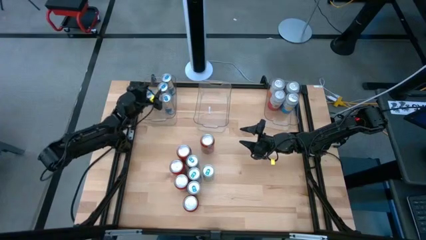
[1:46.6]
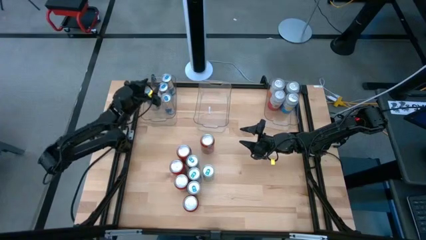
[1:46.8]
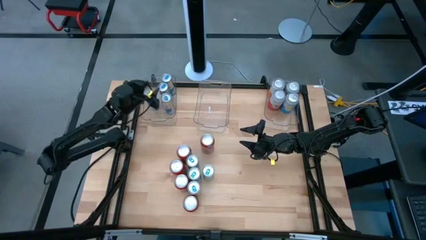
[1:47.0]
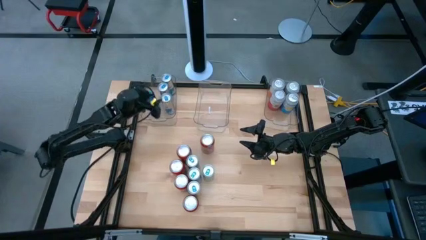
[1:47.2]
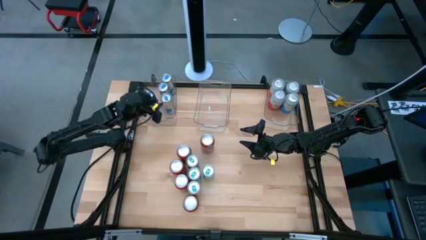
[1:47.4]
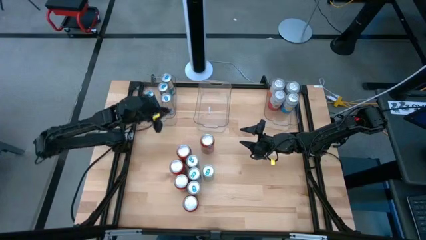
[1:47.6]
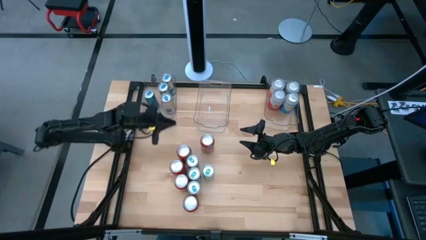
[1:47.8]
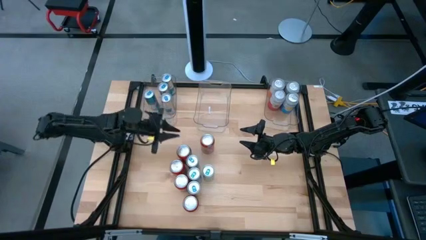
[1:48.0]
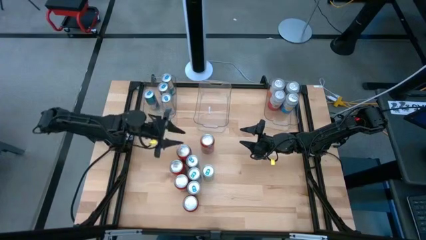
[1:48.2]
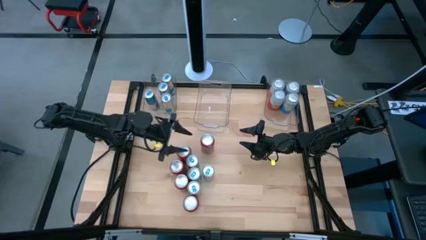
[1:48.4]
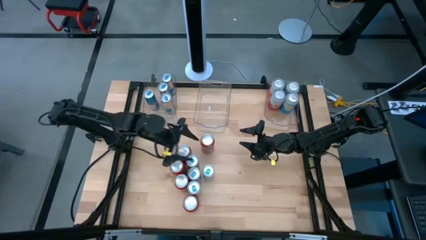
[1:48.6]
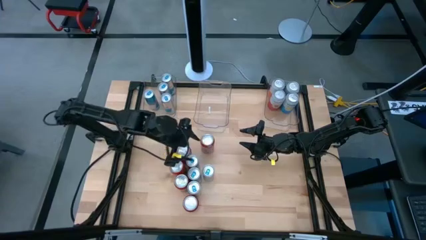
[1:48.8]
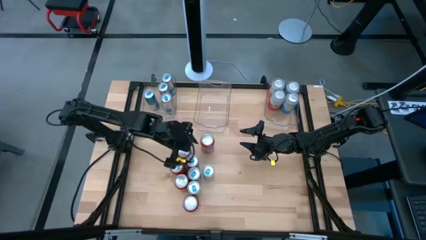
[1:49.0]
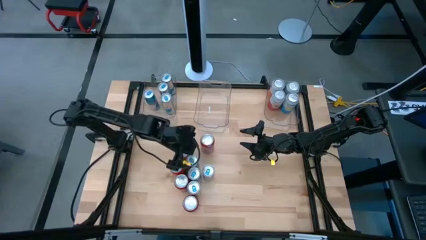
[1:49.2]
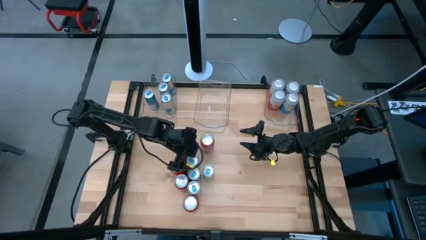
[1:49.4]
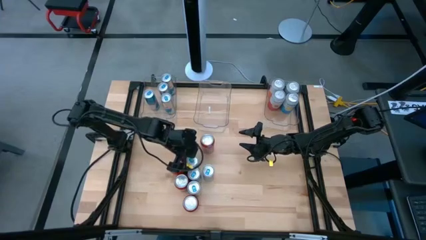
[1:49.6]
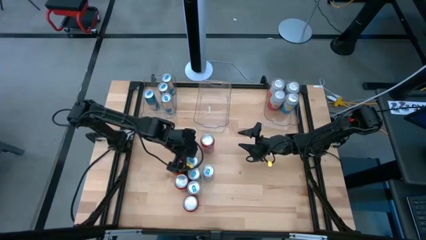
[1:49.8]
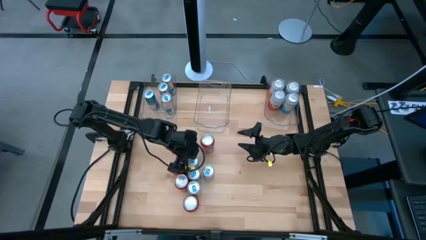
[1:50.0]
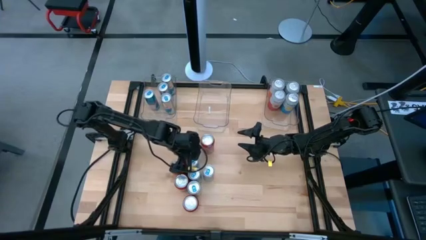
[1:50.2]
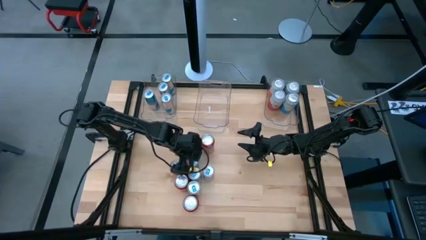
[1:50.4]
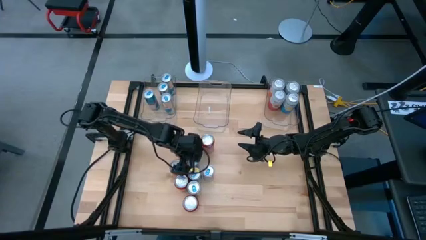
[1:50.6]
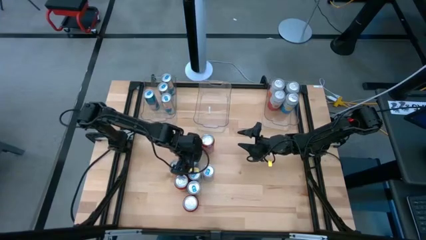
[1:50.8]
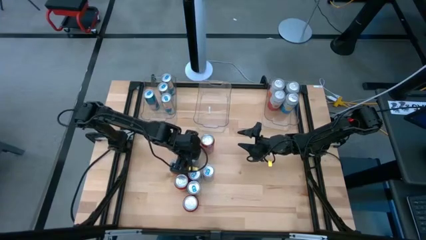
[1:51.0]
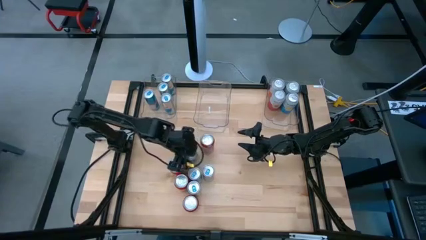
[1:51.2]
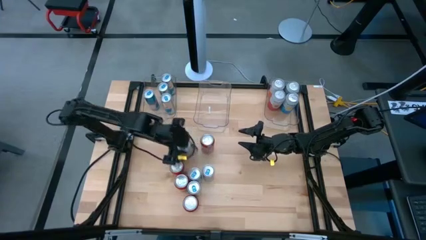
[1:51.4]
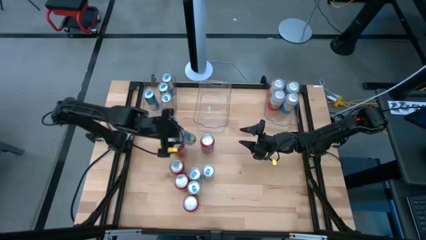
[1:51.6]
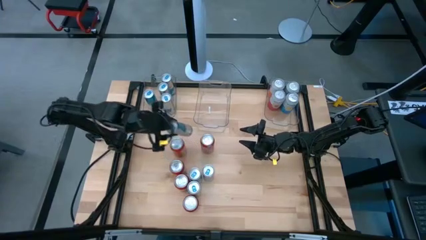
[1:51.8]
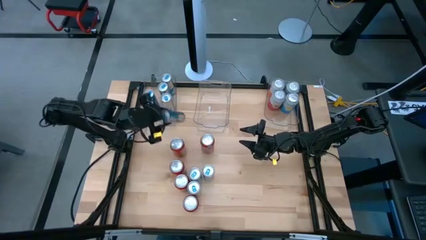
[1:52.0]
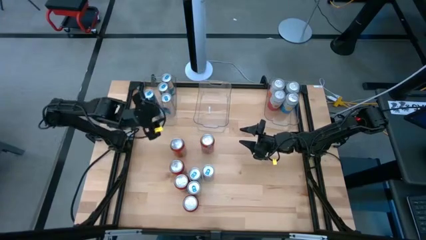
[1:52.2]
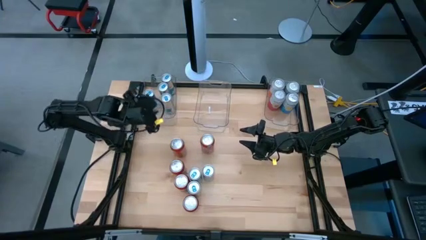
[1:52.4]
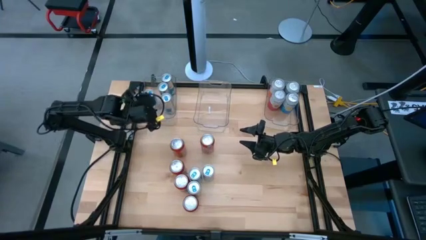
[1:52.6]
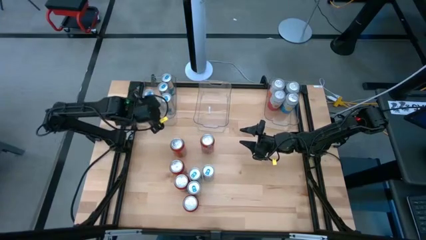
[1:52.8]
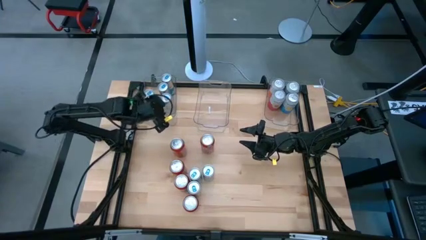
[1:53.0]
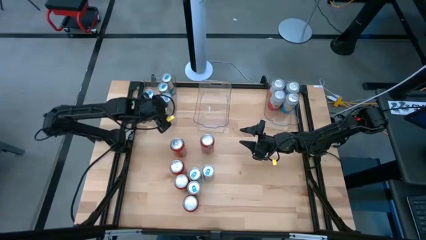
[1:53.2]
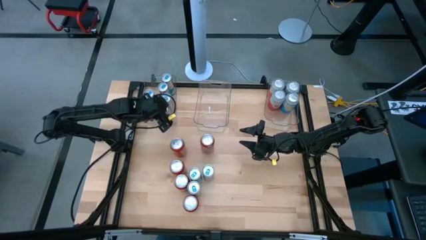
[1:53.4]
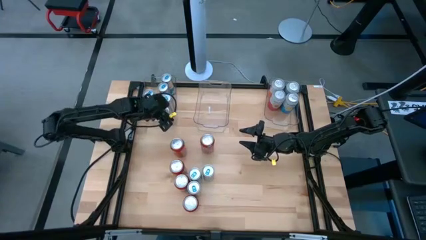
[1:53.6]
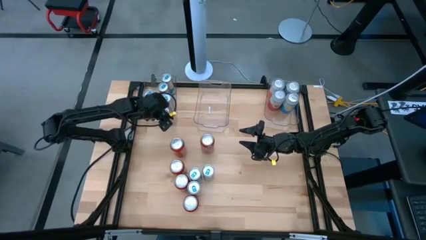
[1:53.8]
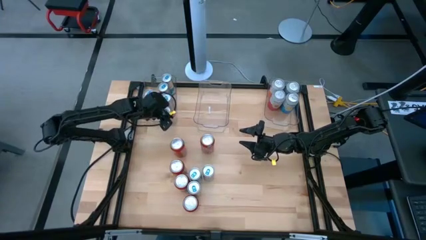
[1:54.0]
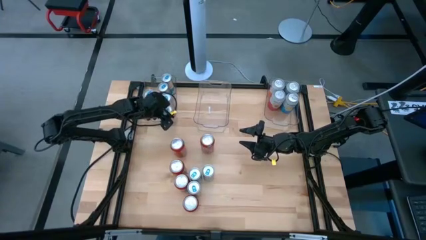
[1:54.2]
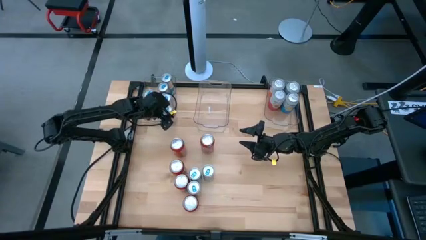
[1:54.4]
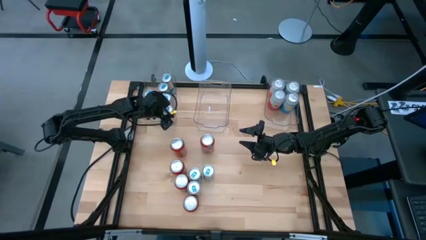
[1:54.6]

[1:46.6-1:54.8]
Task: Sort soda cans
Put the blue soda can into the left transparent bin

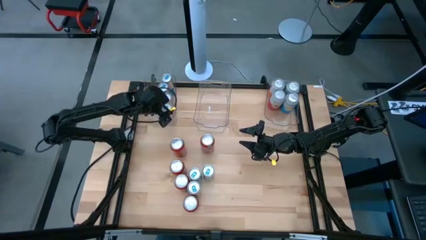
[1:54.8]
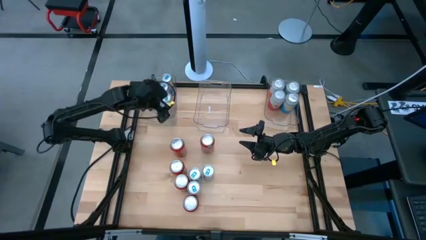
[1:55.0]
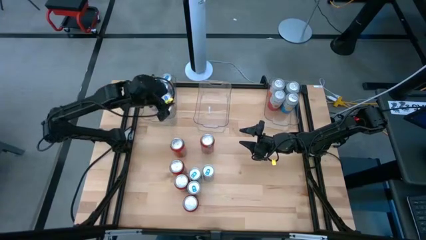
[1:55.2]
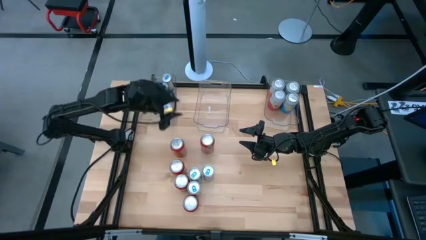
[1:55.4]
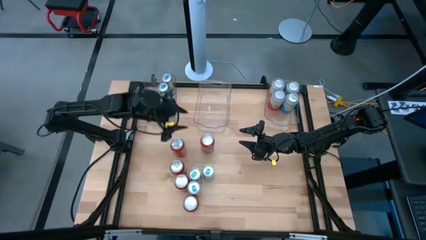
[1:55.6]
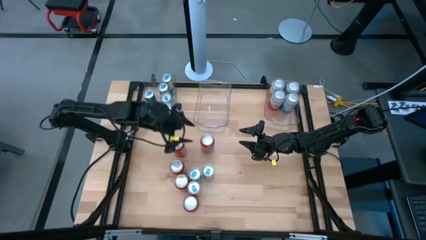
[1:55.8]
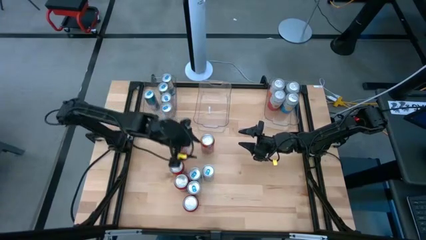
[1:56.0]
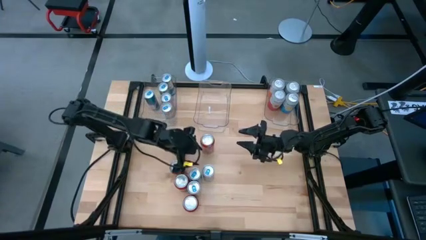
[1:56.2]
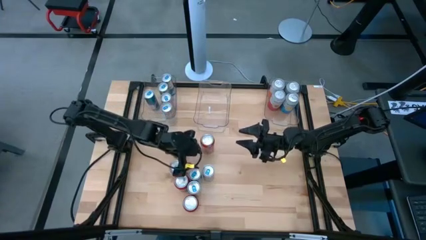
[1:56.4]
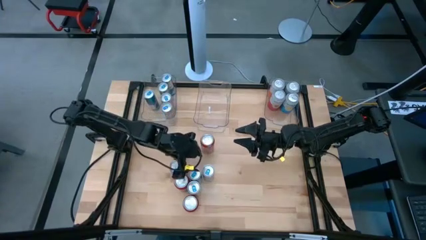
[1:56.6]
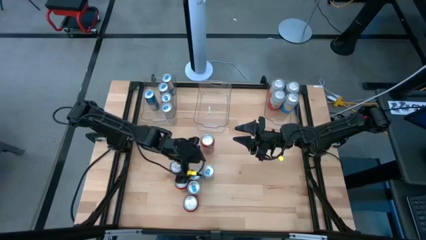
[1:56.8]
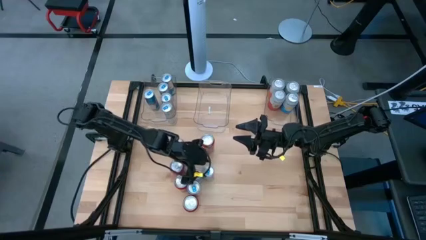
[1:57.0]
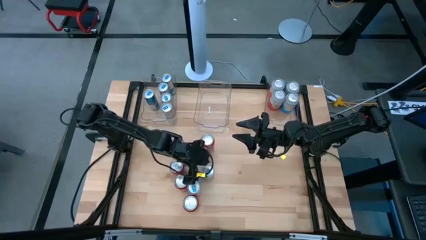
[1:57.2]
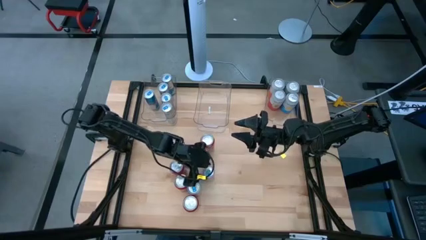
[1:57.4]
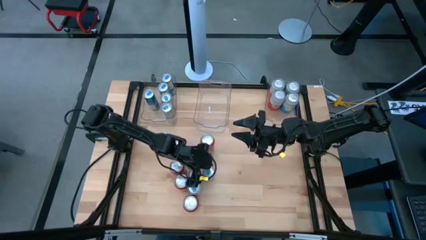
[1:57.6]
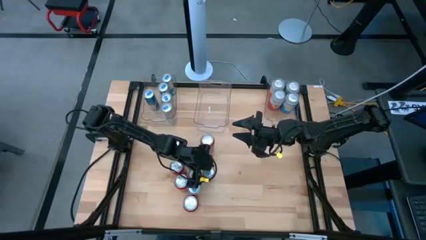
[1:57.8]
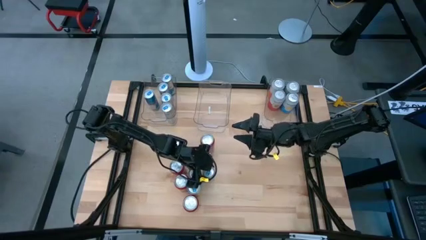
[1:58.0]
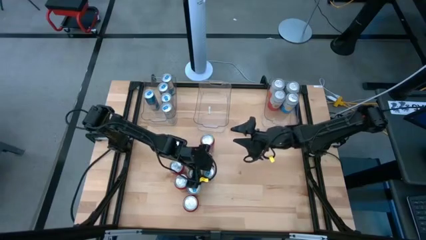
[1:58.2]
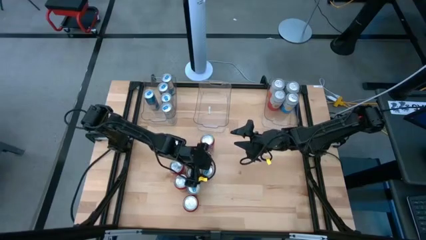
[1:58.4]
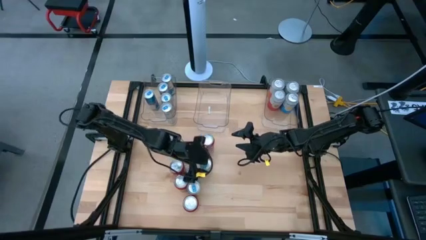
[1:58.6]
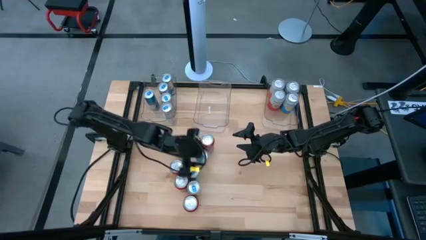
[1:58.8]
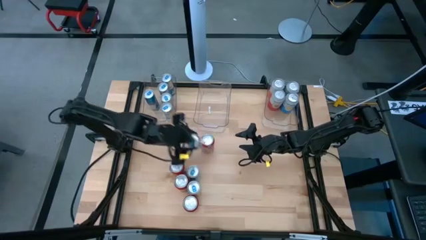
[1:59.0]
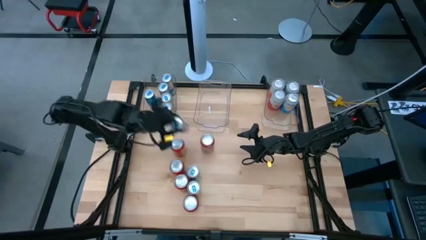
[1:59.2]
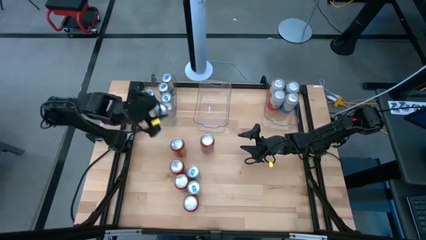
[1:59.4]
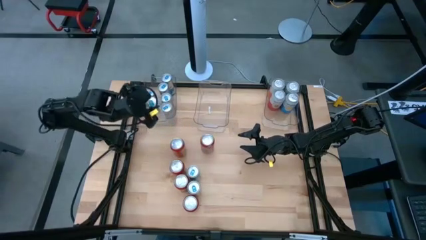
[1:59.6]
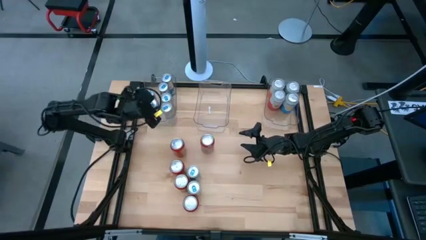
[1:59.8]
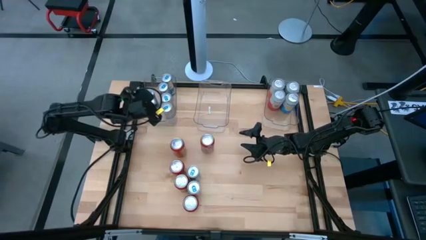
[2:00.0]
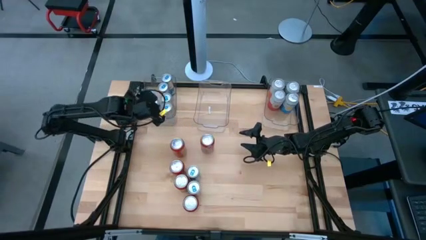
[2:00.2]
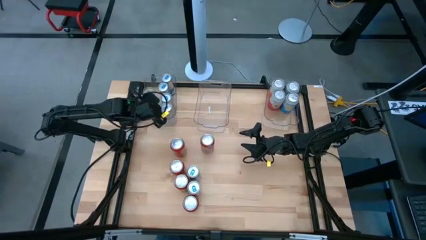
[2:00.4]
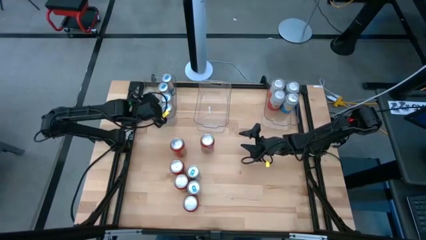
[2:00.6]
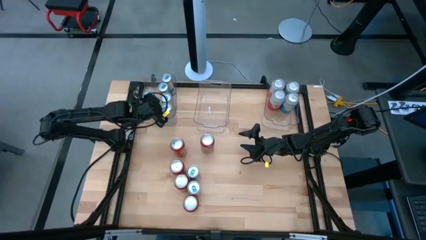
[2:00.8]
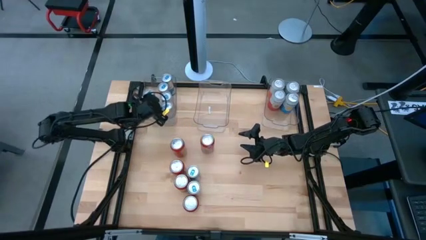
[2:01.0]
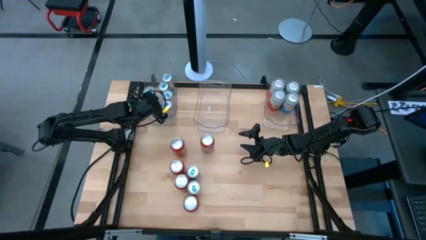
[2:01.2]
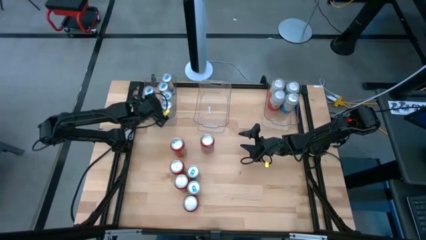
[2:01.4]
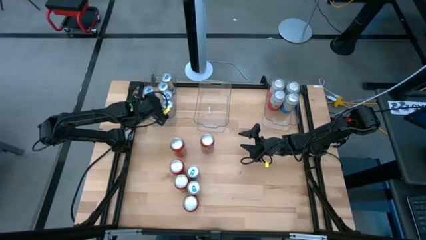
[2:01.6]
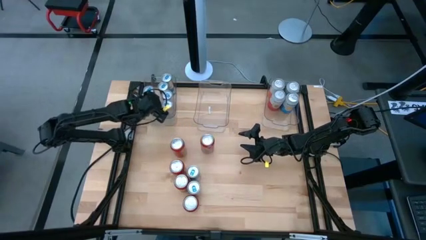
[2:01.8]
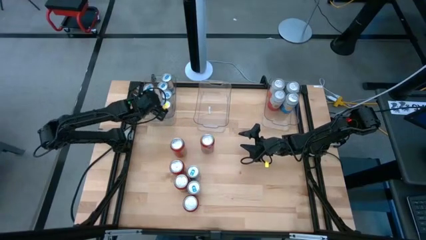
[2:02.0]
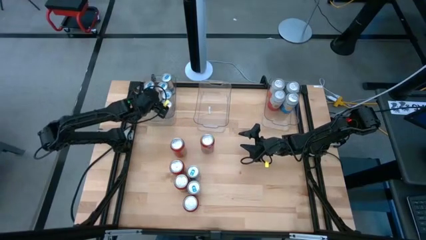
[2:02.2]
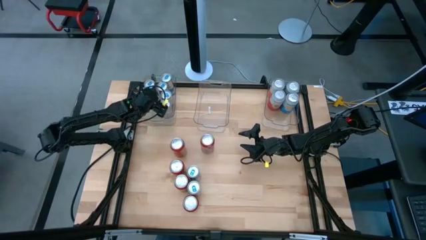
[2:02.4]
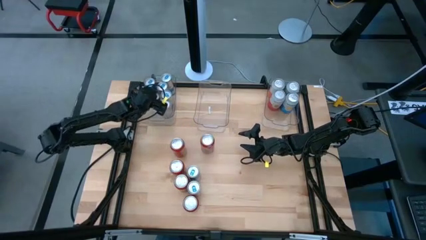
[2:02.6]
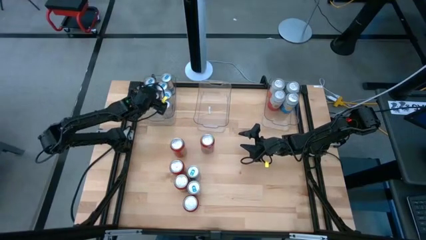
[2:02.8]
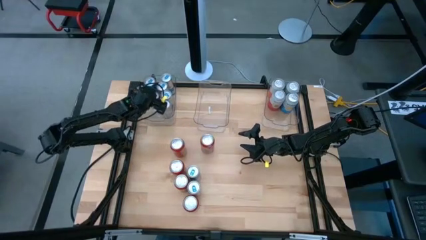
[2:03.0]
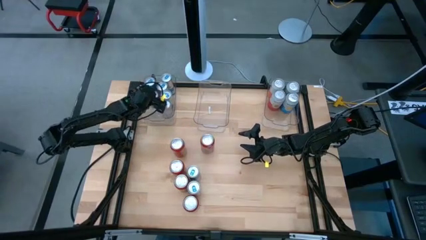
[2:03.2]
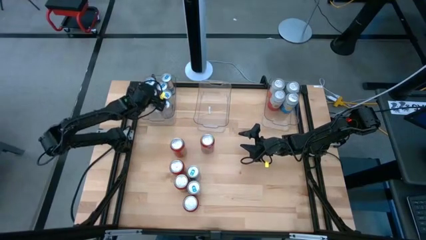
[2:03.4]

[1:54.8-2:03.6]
Put the blue soda can into the left transparent bin
